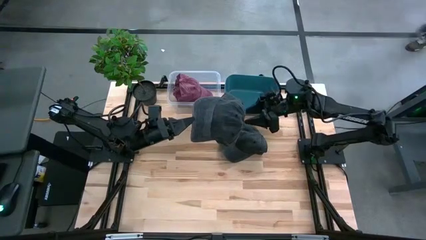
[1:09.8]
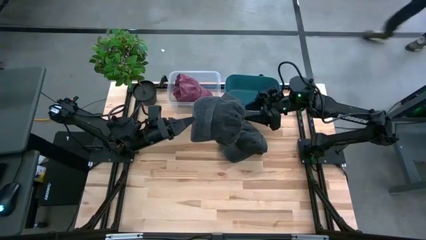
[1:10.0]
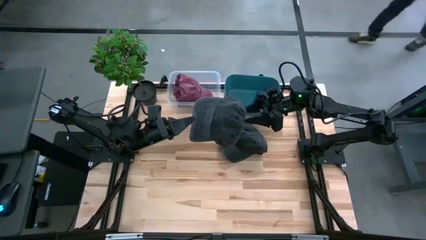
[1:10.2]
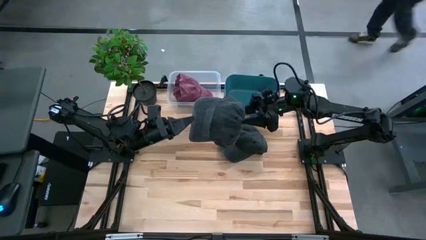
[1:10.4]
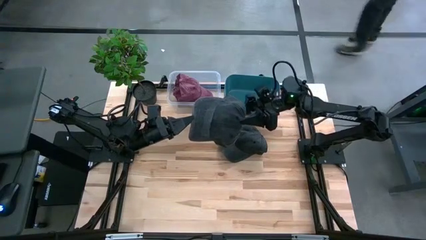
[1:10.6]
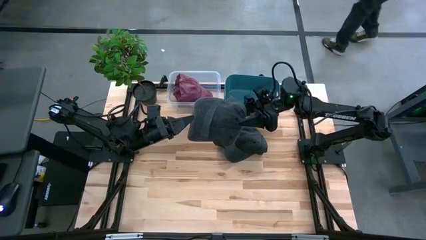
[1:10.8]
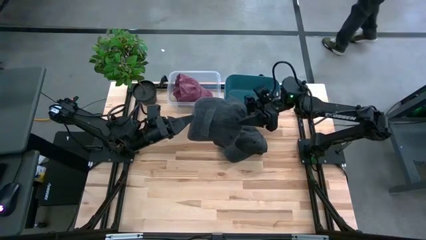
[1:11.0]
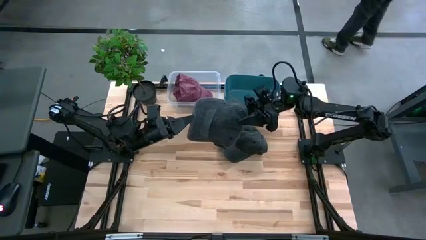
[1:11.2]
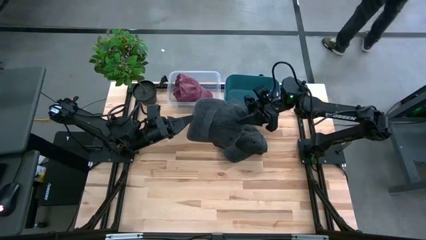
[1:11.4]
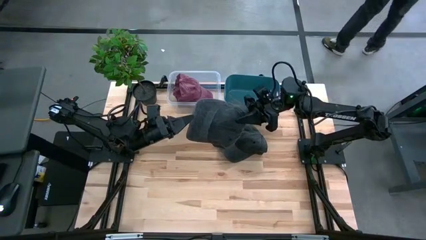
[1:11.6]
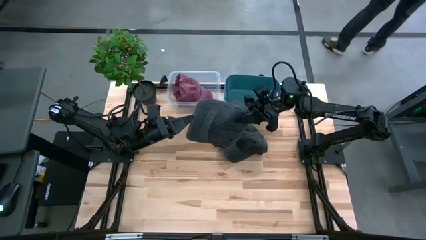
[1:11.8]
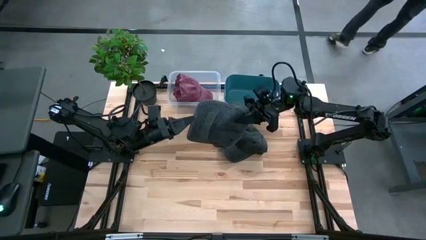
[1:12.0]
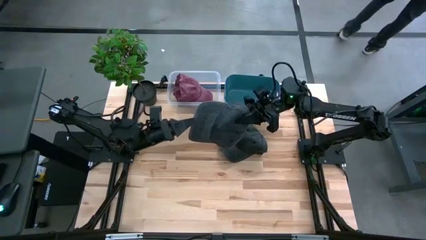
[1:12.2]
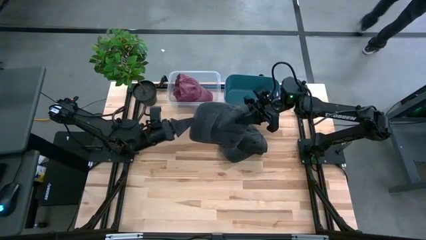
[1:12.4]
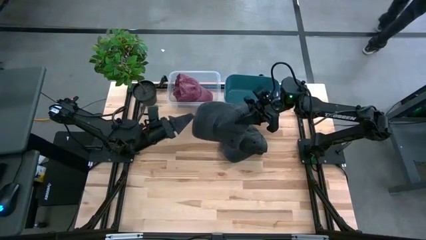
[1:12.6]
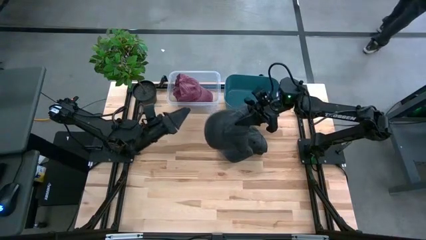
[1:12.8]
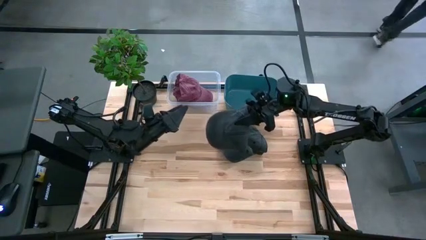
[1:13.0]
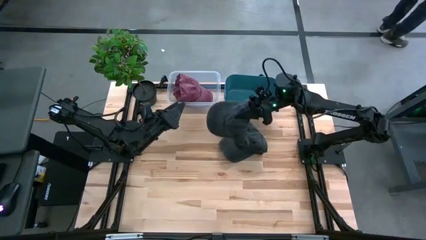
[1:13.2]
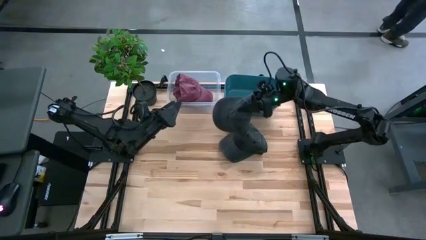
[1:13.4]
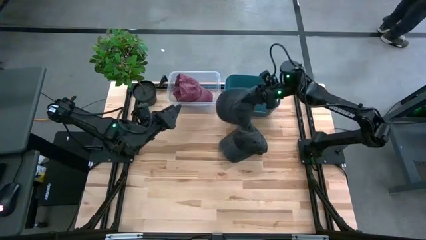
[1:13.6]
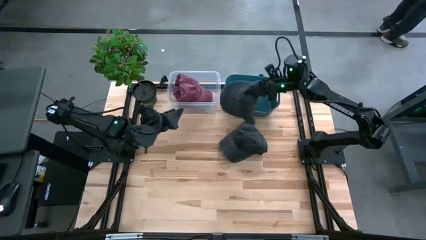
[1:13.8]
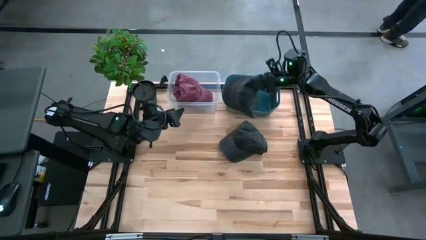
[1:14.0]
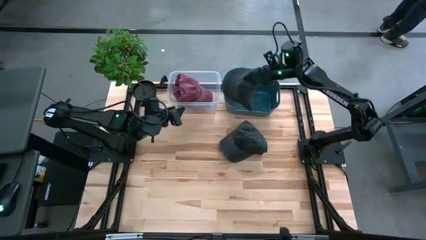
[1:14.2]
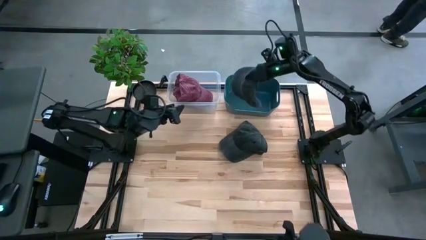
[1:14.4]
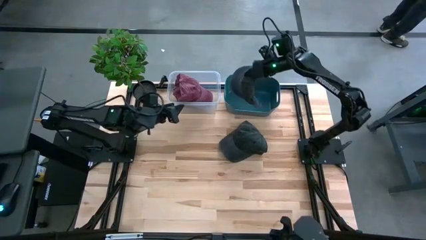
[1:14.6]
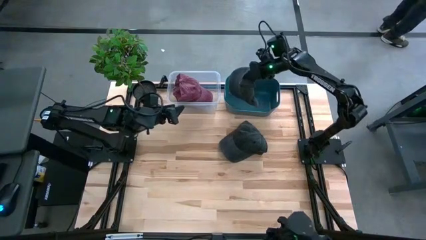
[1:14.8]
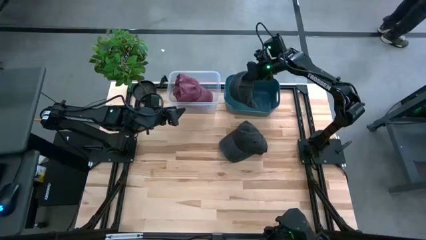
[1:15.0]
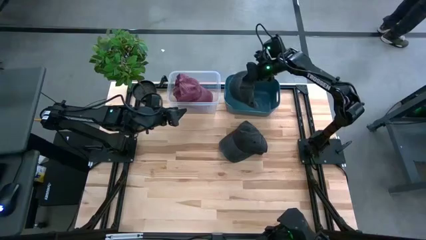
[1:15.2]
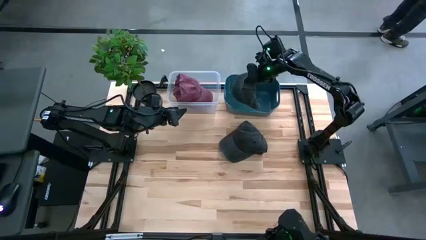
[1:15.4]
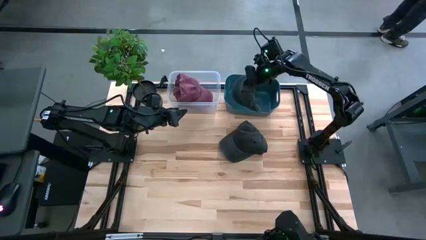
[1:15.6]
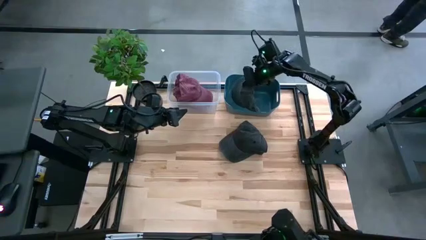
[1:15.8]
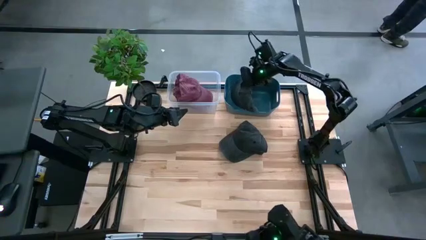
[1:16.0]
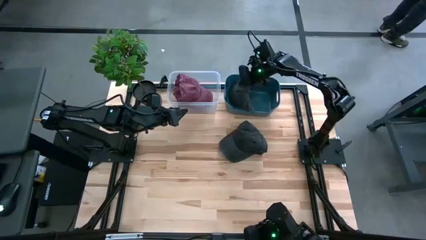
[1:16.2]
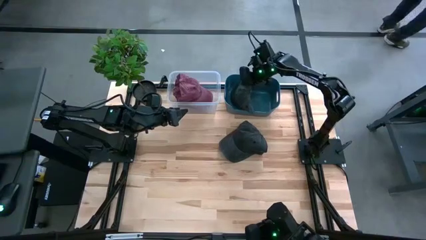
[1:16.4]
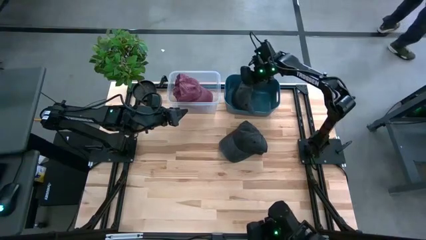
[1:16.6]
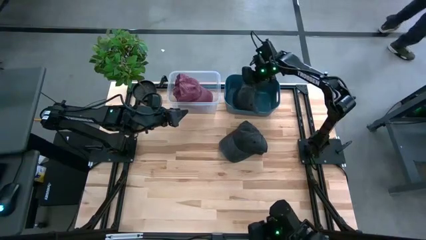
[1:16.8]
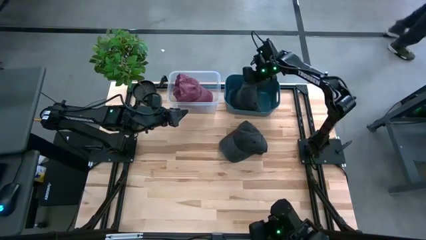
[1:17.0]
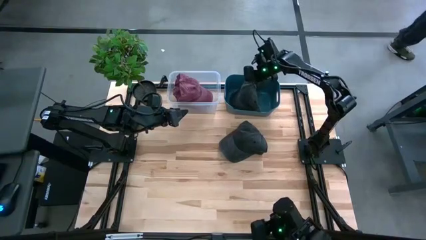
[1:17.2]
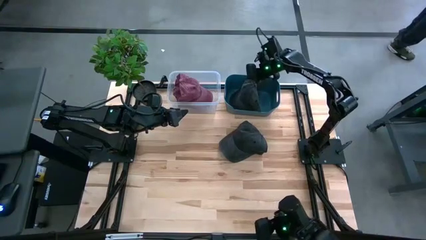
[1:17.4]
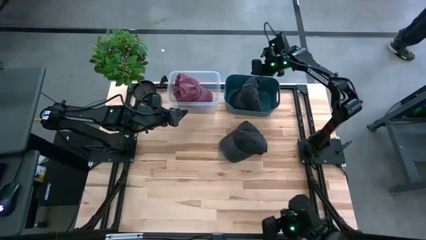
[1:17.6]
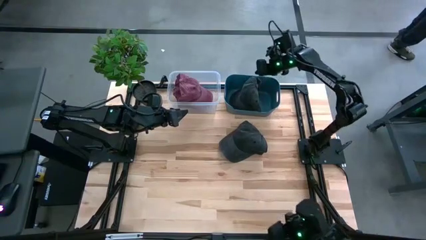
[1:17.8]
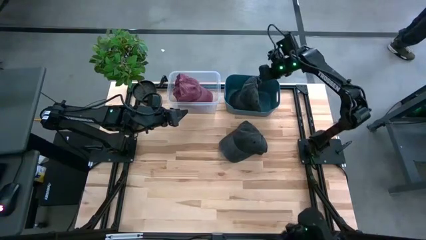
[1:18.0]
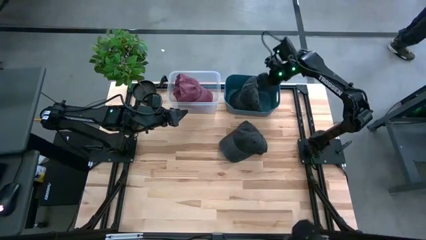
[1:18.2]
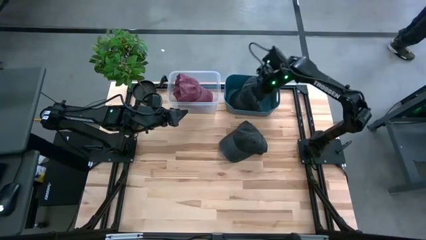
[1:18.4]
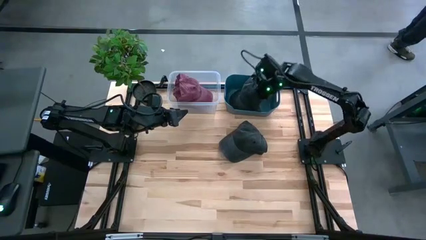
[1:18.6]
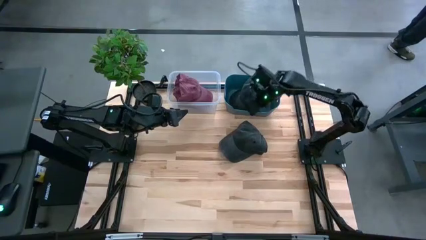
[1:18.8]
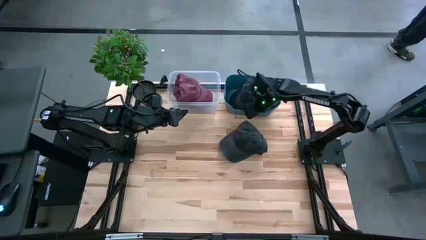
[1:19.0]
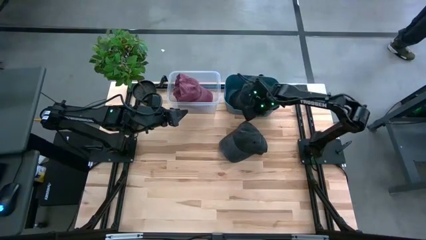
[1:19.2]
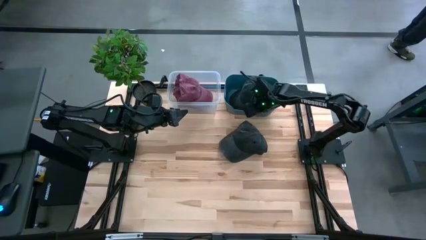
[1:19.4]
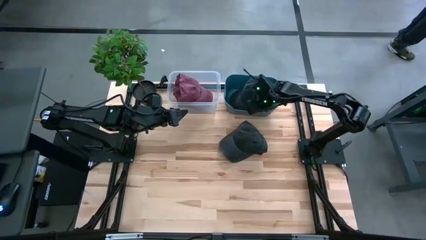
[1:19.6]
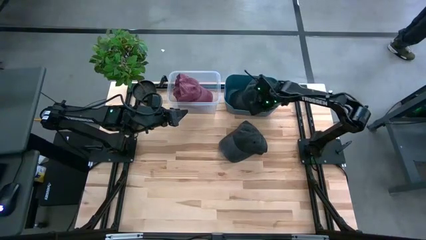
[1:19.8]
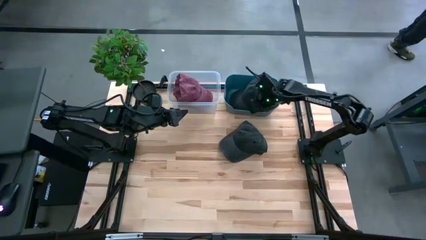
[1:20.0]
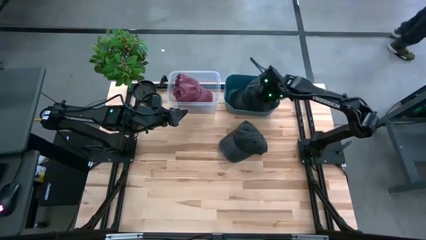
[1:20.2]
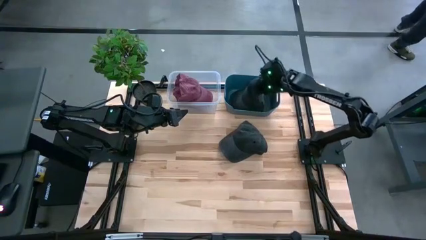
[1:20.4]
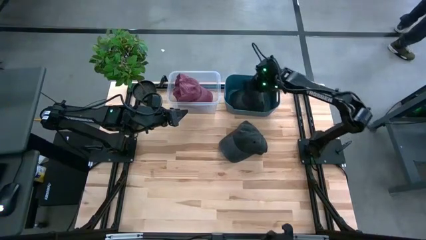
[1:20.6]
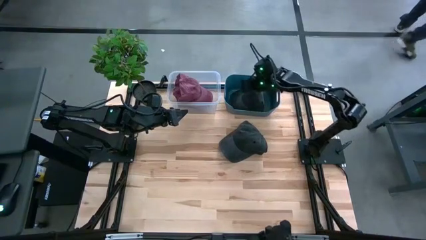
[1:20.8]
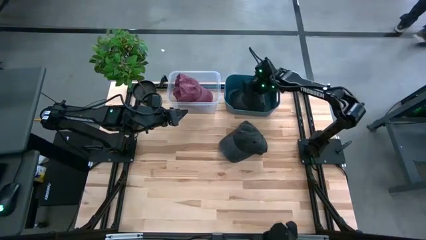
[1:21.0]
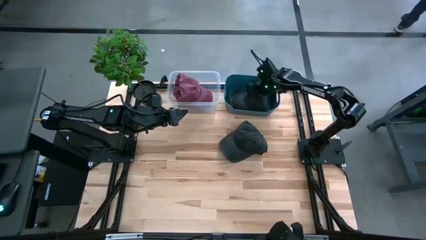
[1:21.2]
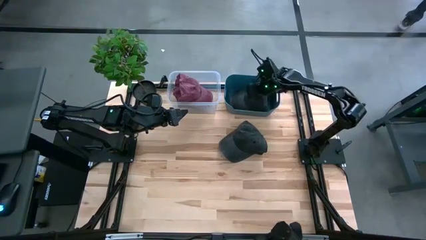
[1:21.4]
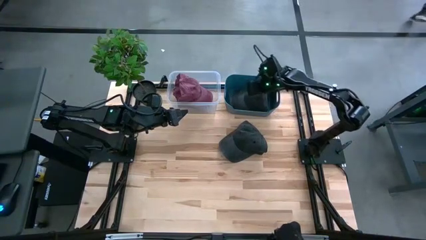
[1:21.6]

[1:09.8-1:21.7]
Task: Pick & Place hat
Put the bottom black cap into the blue bin
